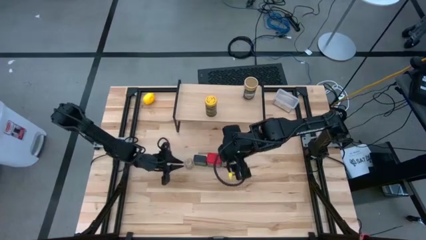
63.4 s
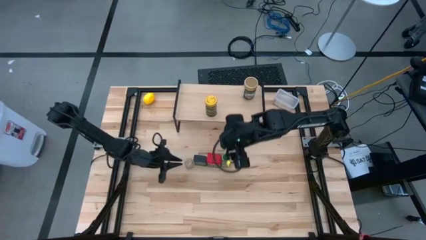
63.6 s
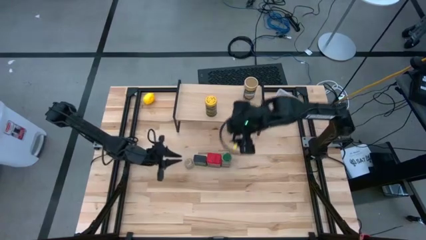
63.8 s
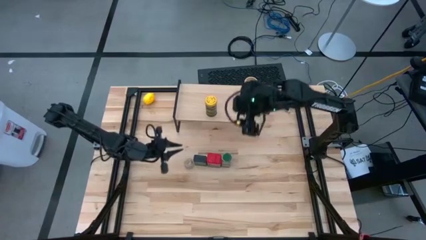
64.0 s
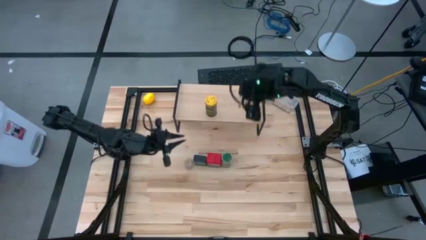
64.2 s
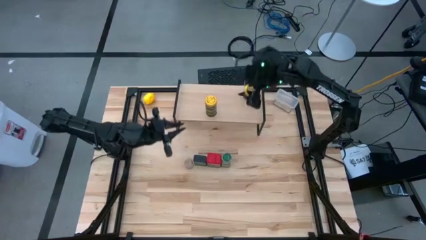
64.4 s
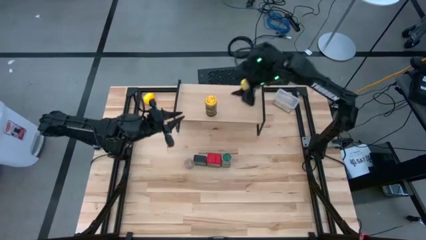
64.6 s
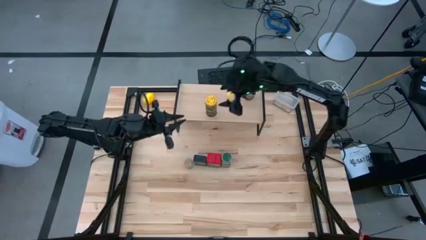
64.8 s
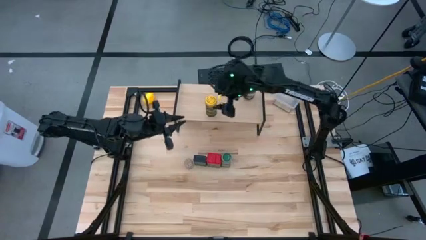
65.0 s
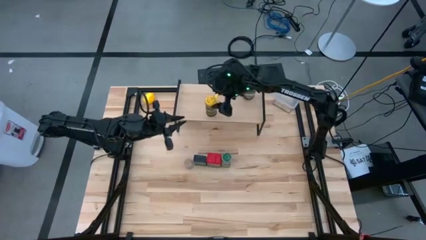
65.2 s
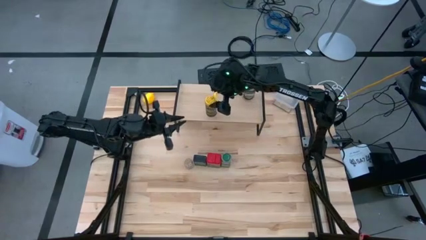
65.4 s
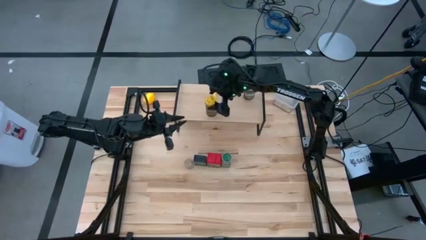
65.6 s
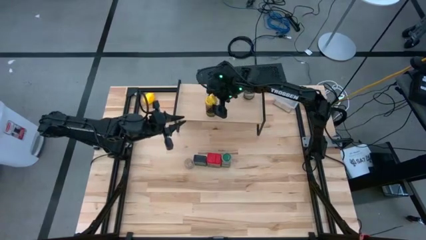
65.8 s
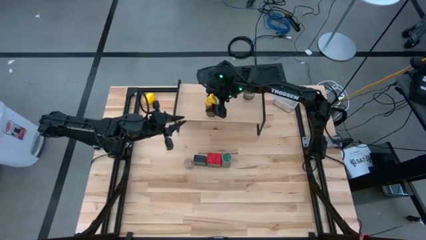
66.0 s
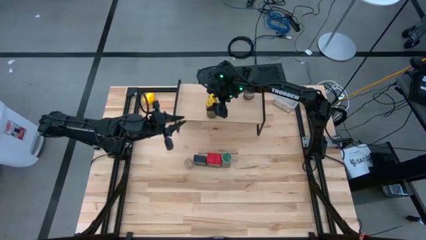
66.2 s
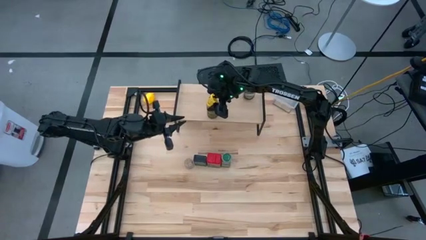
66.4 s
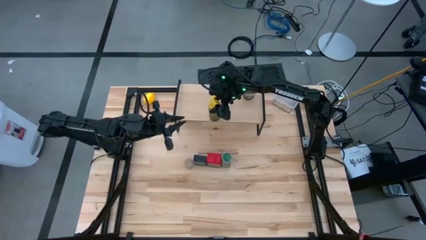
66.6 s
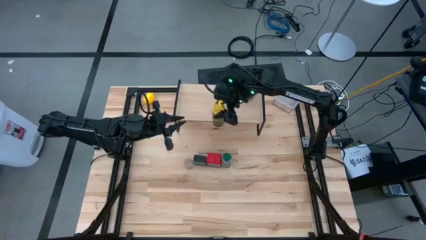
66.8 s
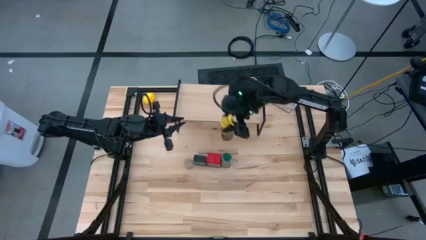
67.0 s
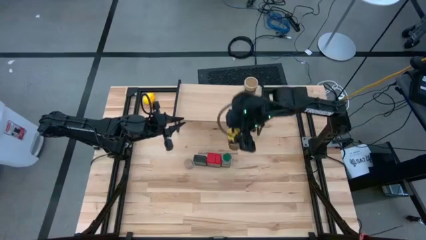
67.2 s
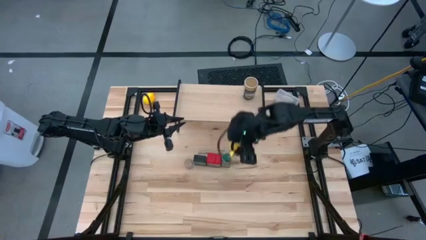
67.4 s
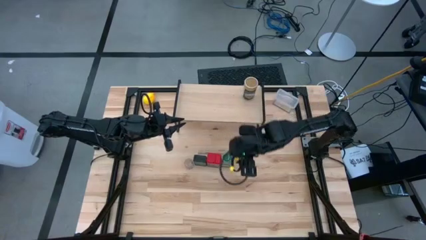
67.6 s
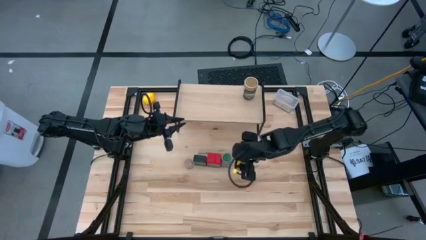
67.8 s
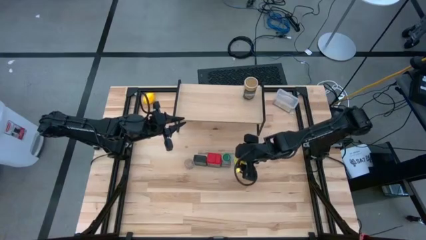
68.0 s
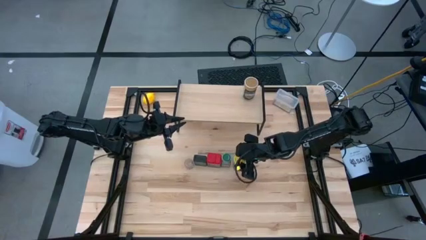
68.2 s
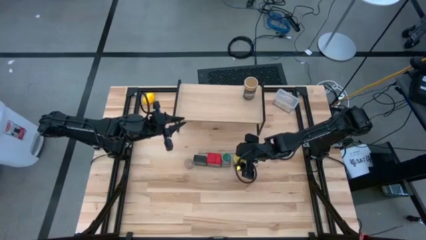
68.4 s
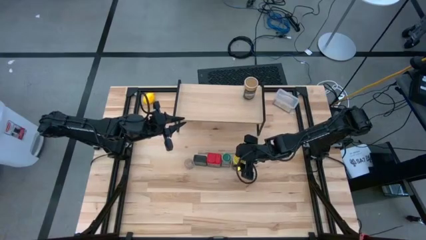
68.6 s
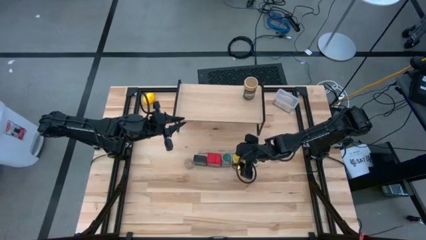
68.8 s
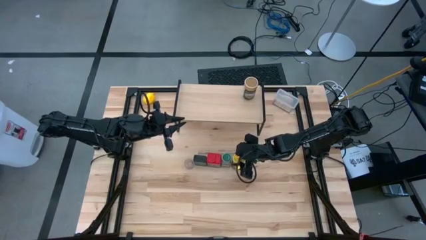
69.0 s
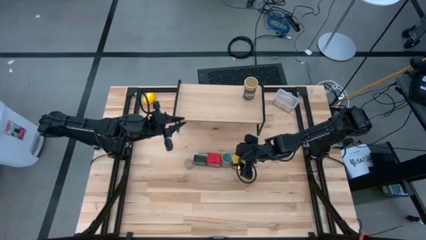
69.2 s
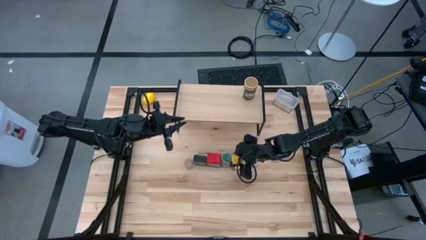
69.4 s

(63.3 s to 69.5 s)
Task: Shelf spices
Remove the yellow seasoning bottle from the shelf

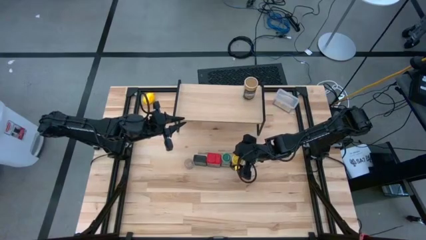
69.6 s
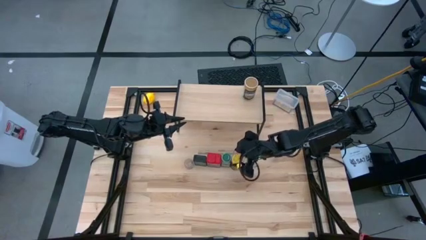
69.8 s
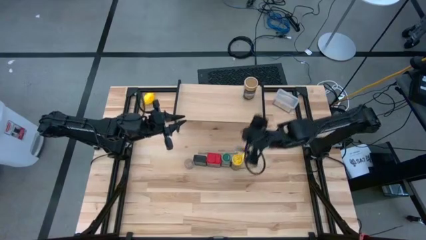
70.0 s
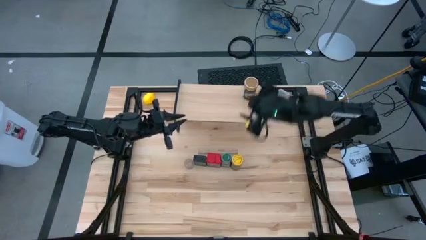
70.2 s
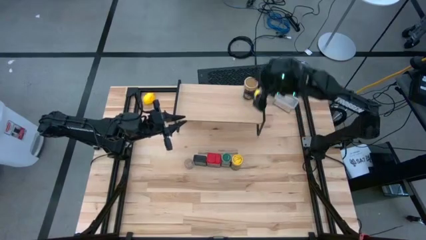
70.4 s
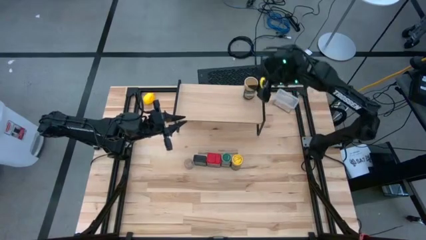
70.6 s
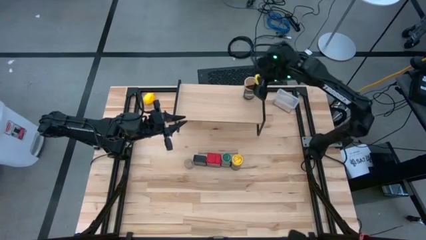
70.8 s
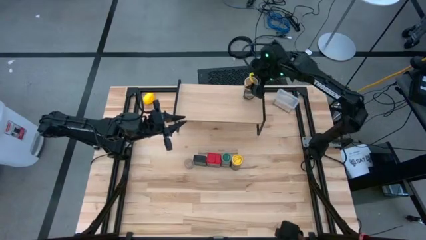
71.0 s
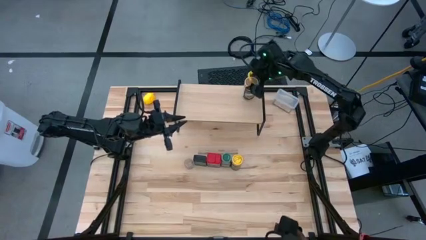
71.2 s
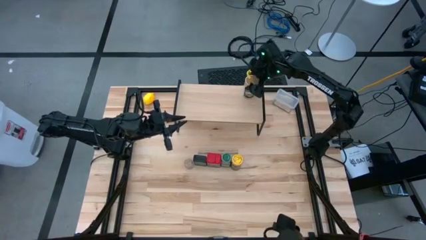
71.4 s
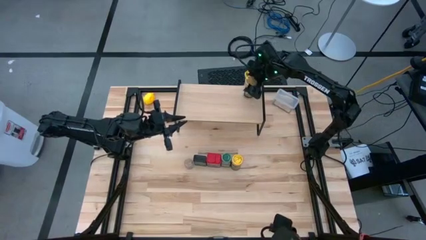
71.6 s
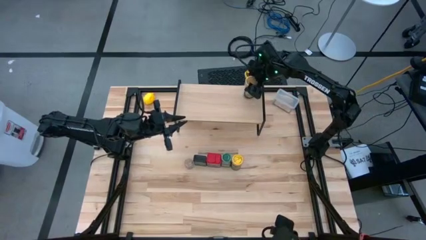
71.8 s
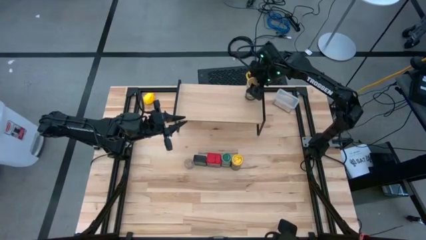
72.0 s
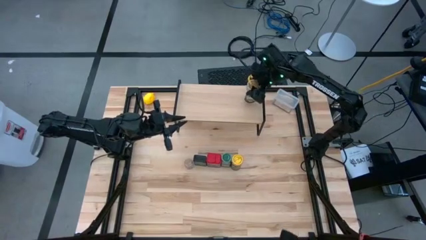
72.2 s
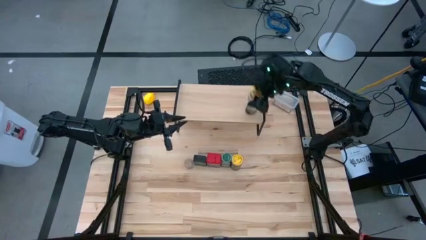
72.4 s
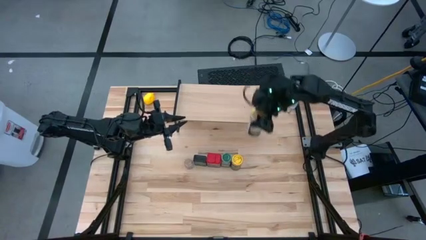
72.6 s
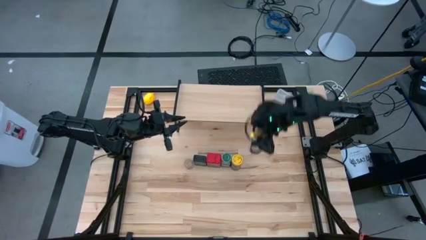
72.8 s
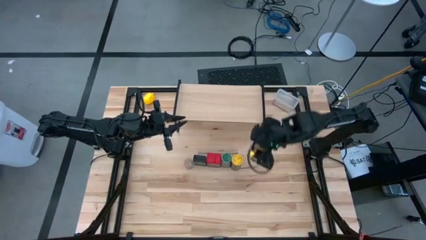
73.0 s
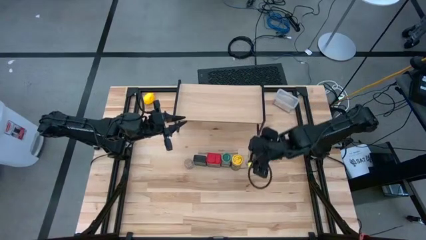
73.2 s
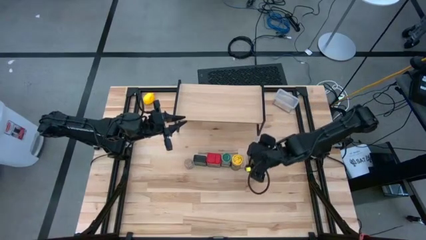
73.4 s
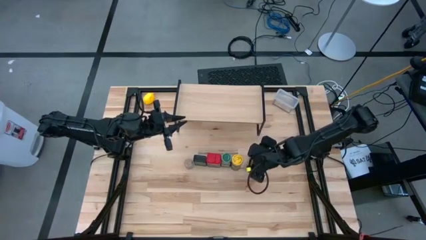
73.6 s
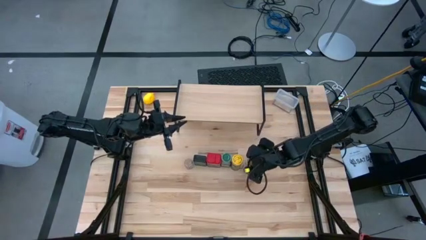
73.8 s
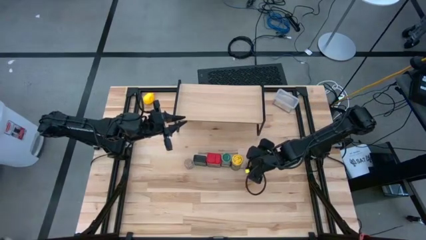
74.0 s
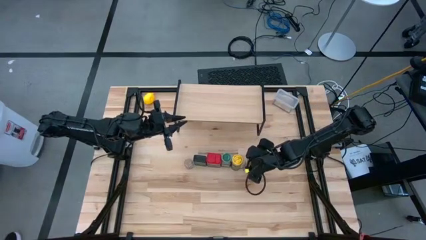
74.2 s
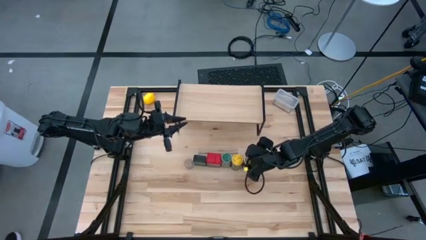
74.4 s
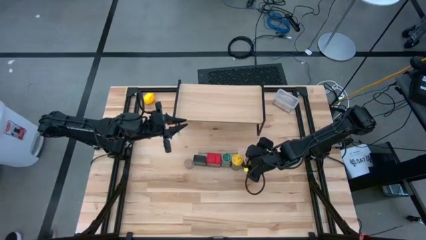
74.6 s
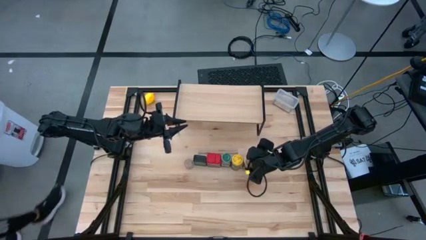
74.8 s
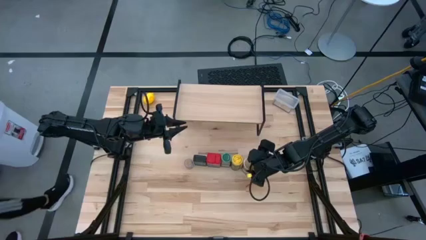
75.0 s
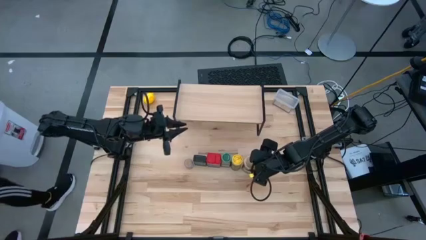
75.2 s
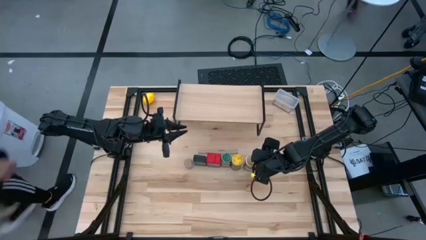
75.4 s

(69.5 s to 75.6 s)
Remove the brown seasoning bottle from the shelf

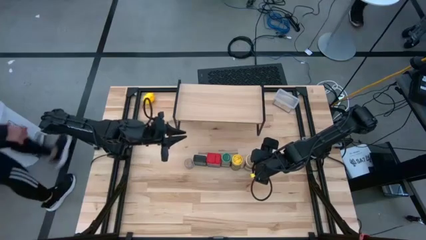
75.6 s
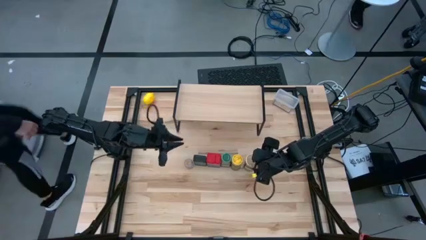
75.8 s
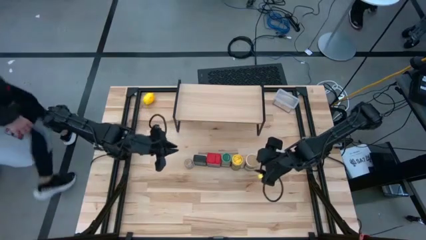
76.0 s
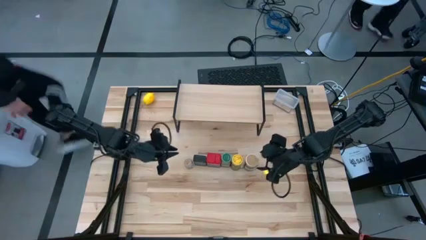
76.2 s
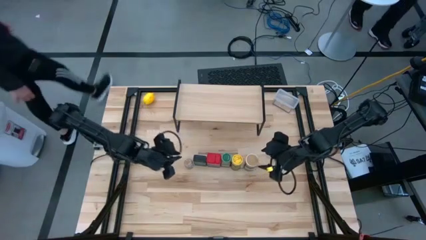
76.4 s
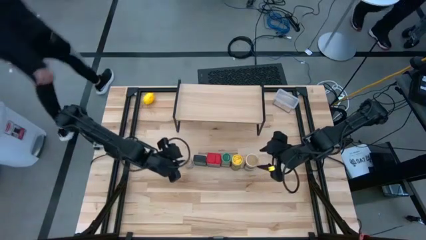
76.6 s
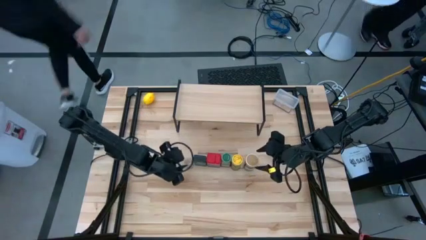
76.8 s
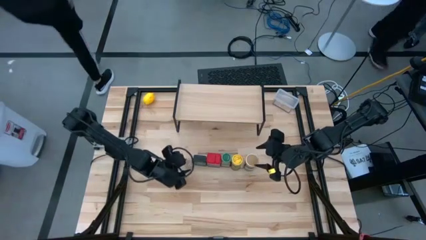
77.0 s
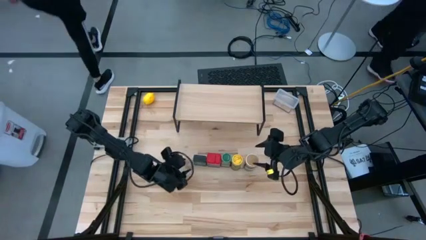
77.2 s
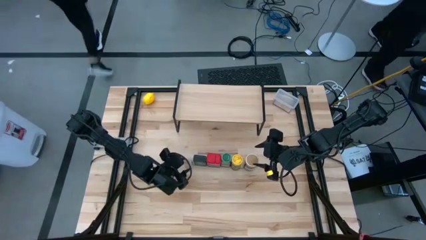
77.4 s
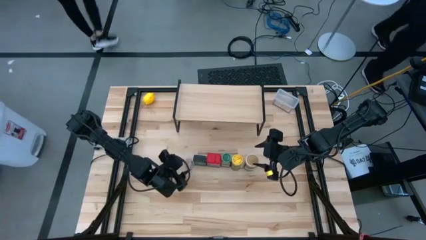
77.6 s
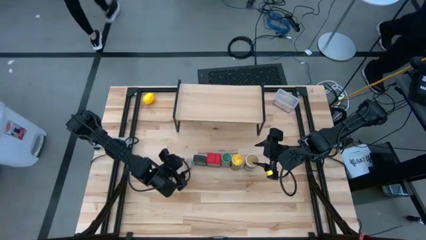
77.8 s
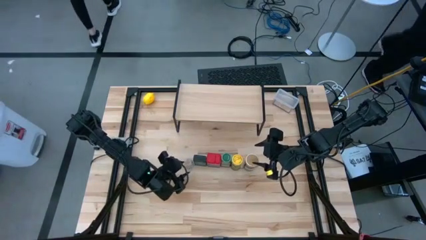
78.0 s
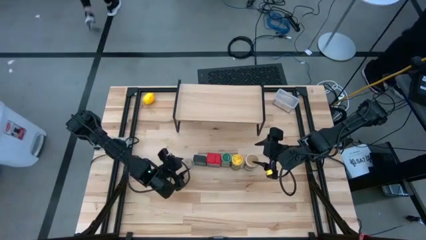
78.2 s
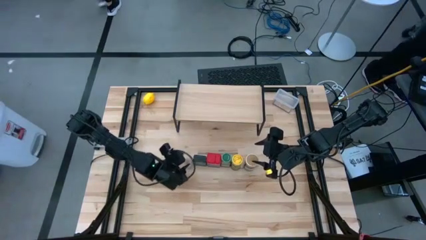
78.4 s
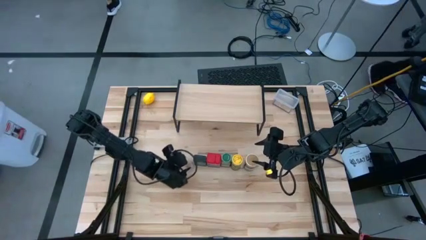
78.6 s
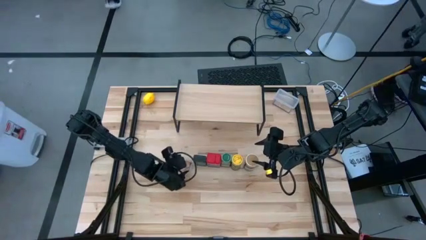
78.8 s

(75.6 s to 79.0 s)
Put the transparent seasoning bottle on the shelf
